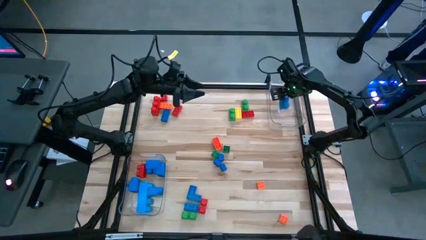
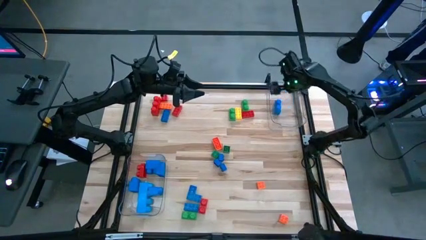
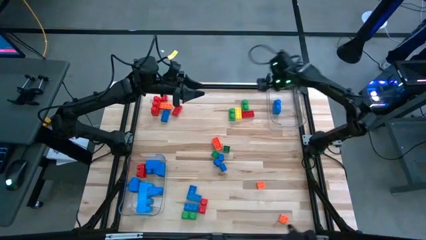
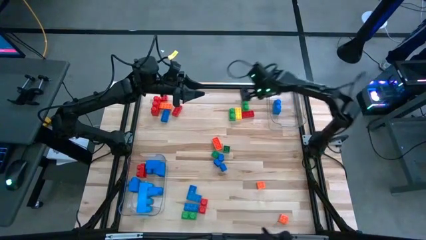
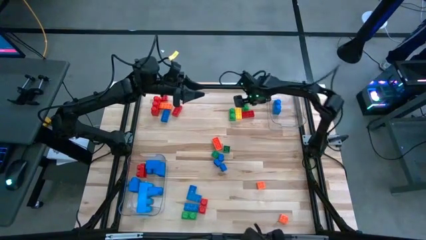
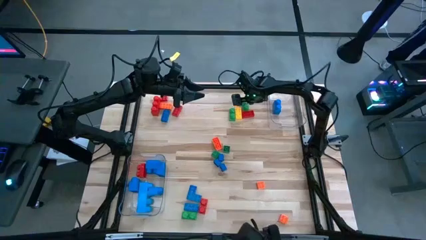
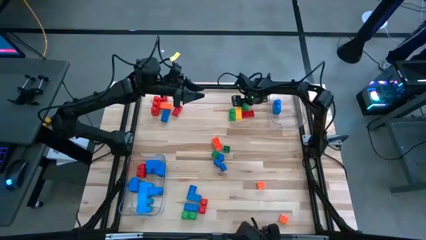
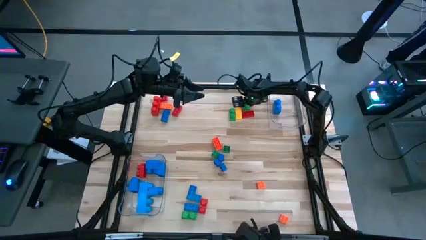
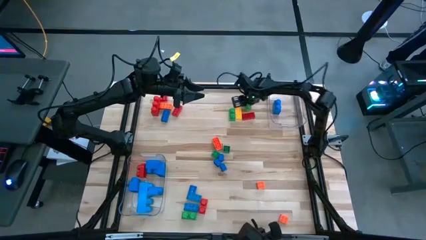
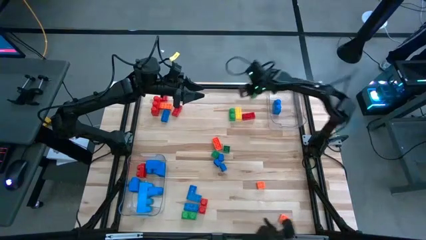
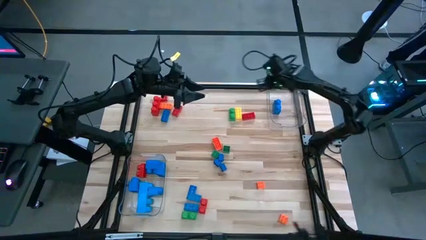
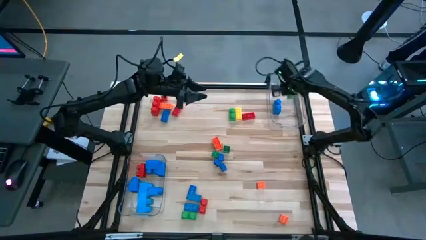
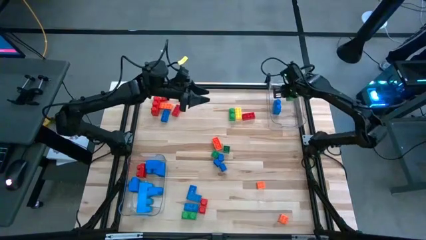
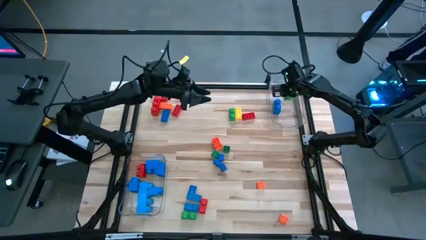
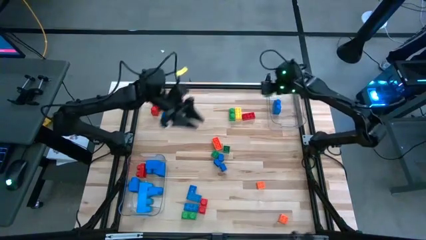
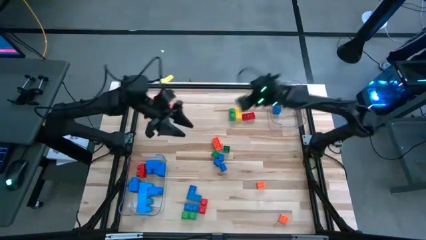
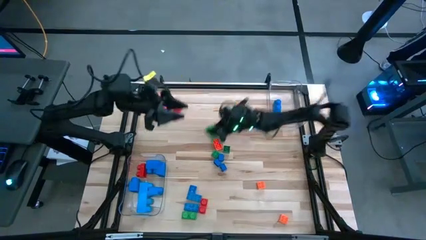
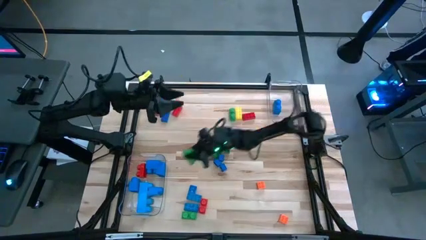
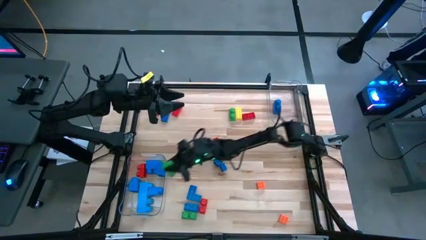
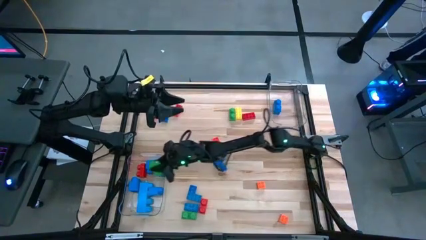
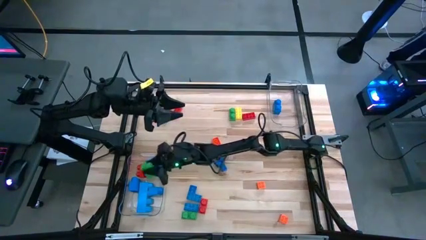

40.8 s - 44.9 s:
Task: Sort blocks by size
Put the large green game piece into the bottom transparent bin

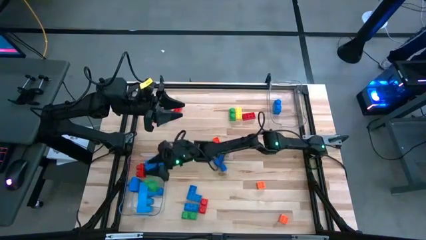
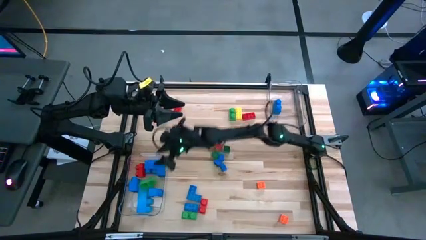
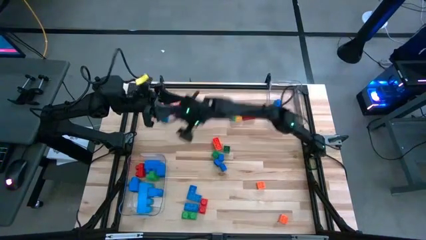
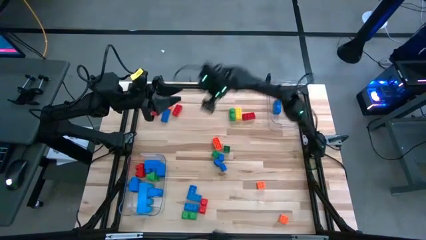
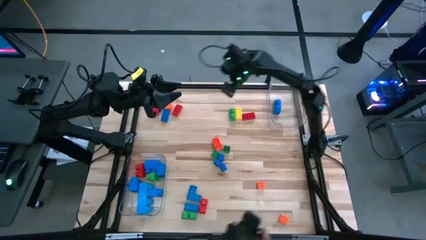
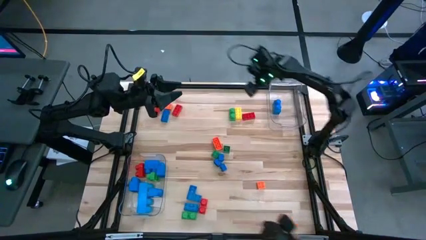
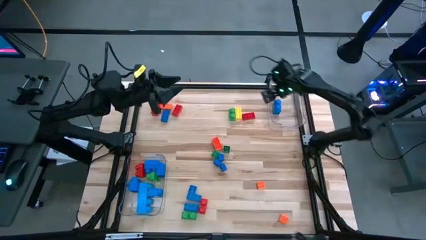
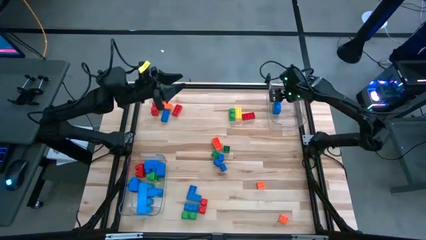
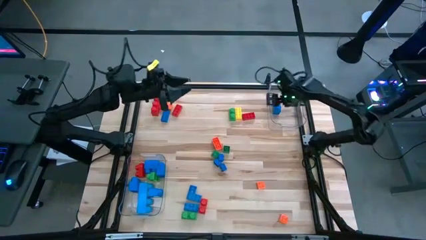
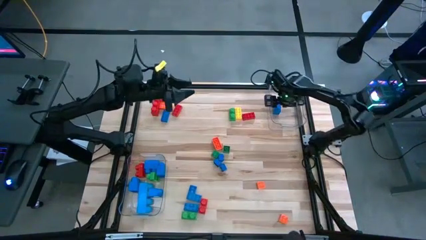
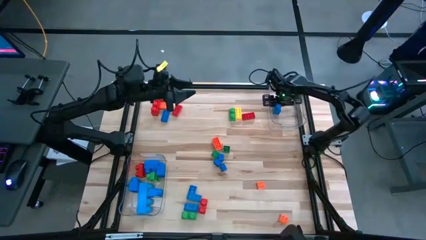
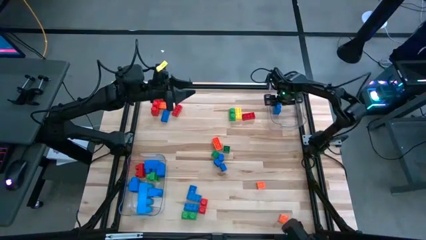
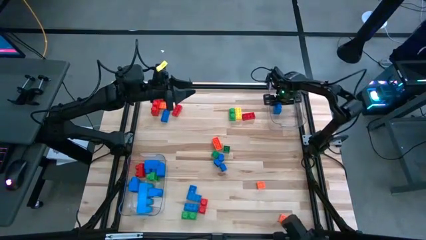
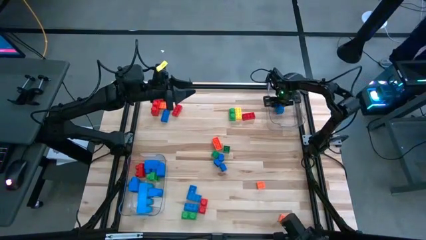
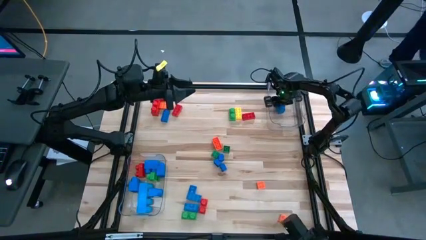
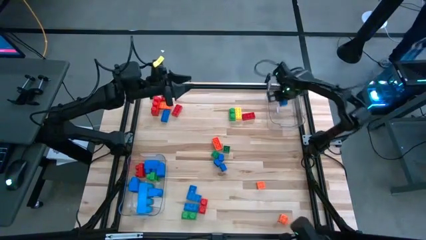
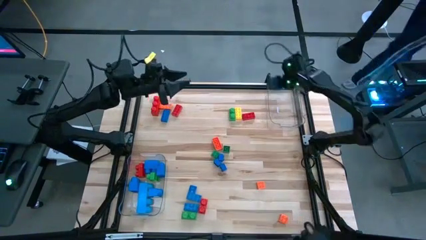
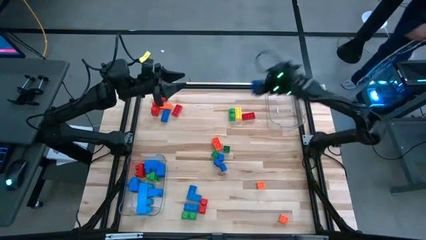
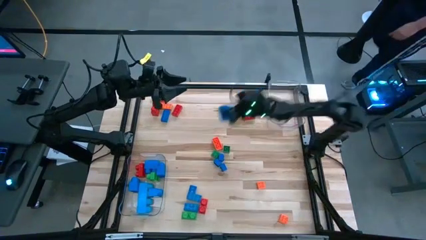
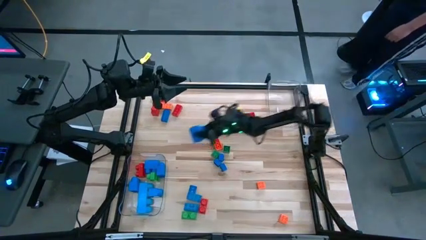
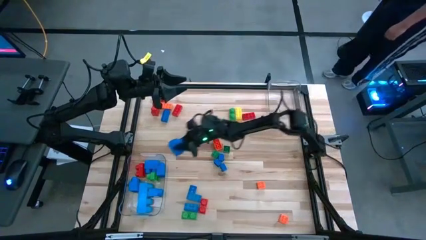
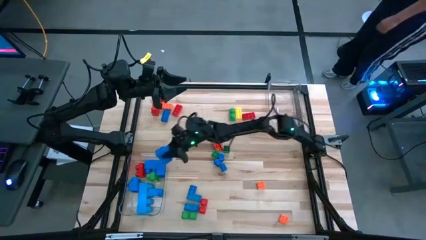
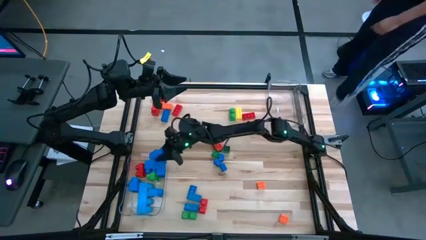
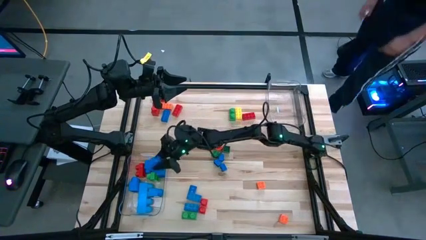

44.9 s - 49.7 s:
Put the large blue game piece into the bottom transparent bin

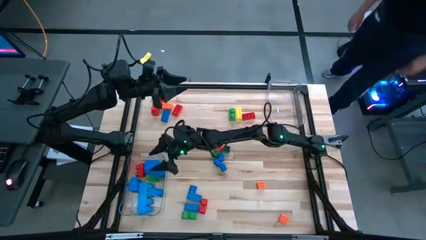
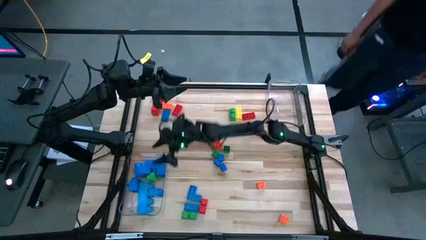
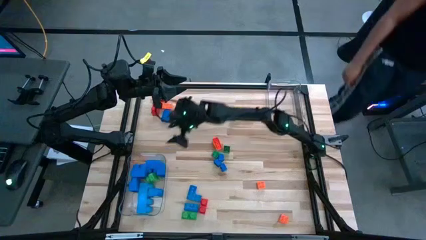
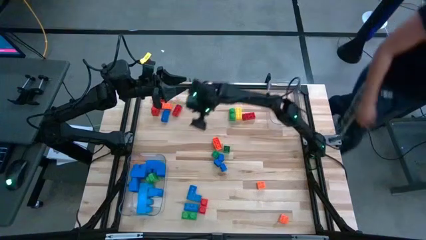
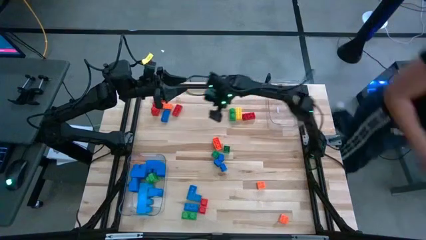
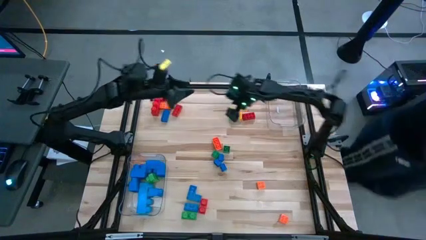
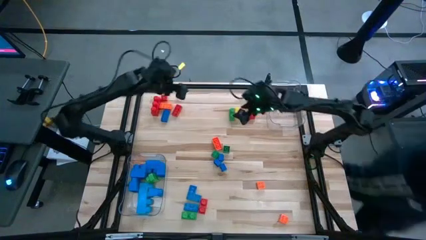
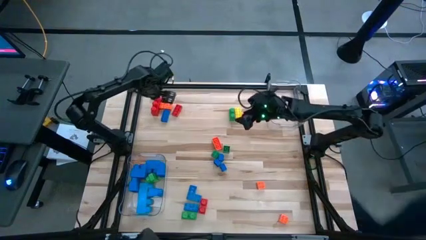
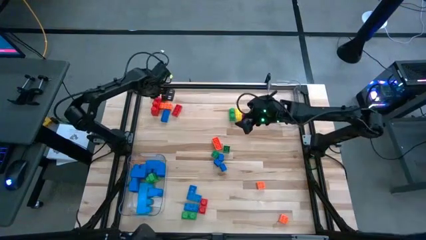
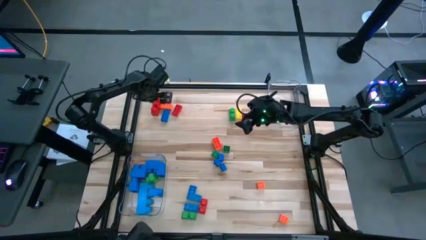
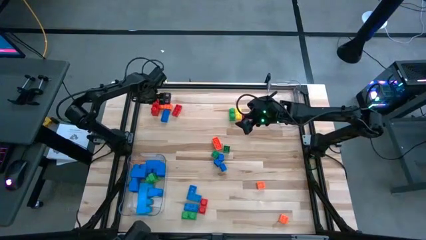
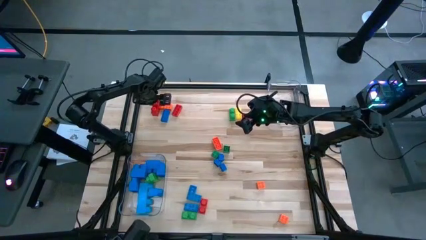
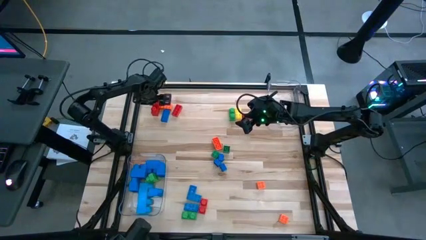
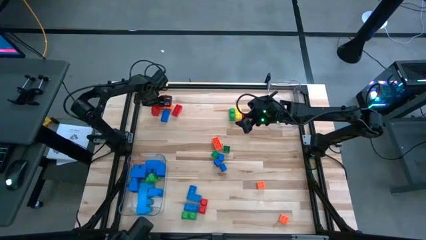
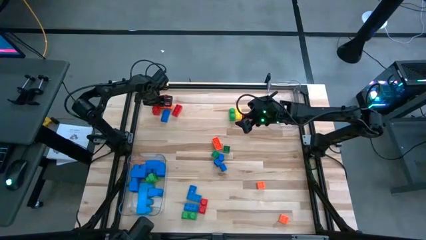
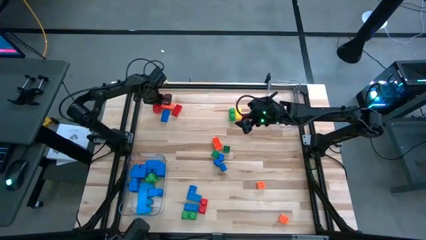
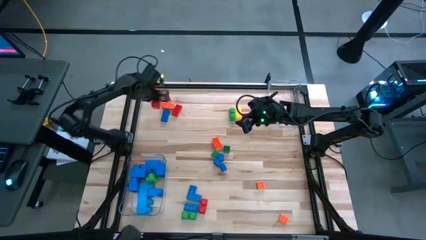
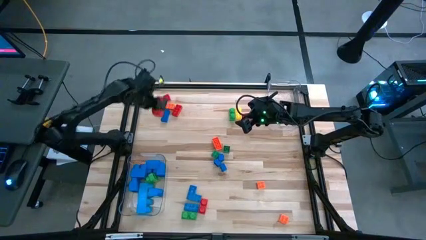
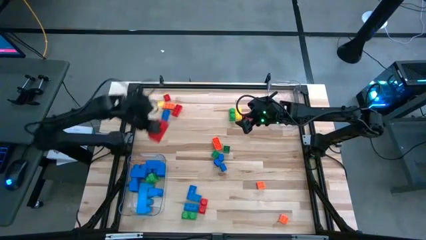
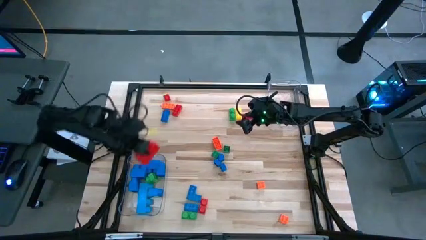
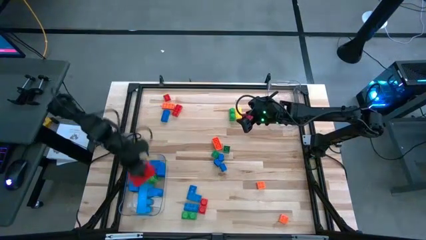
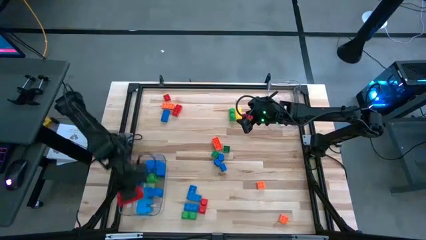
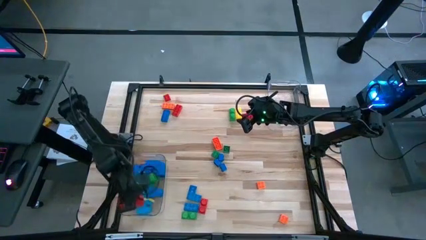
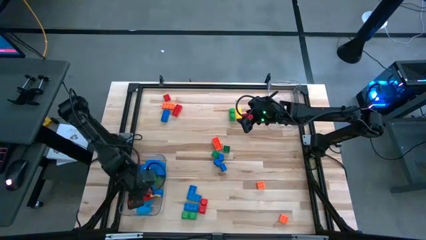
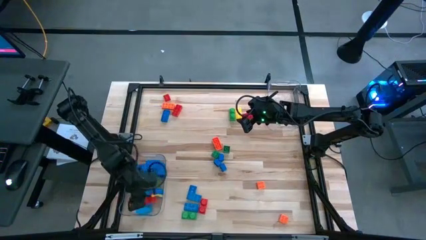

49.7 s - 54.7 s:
Put the large red game piece into the bottom transparent bin

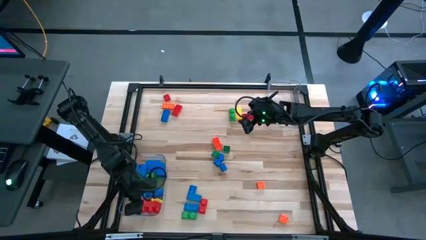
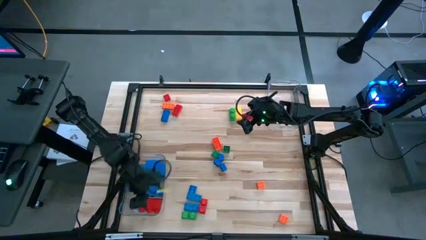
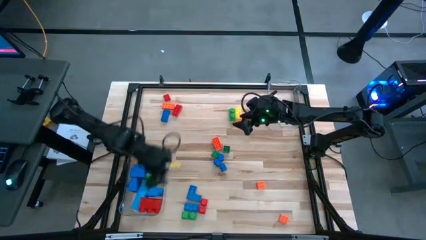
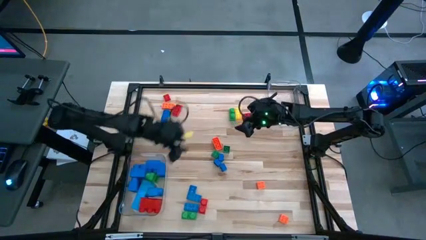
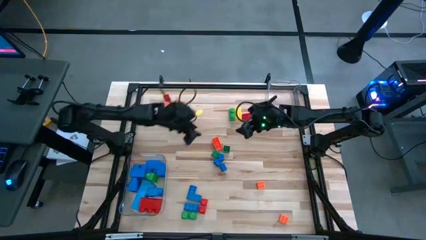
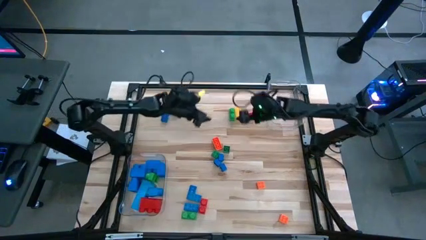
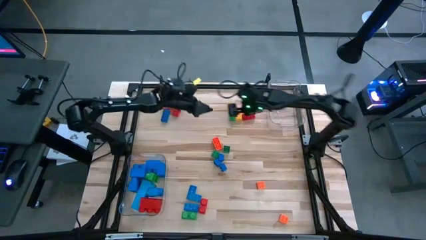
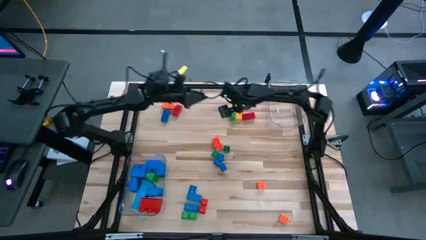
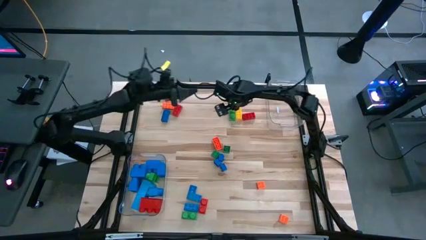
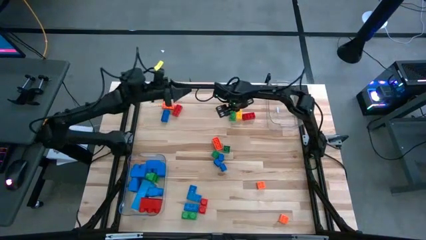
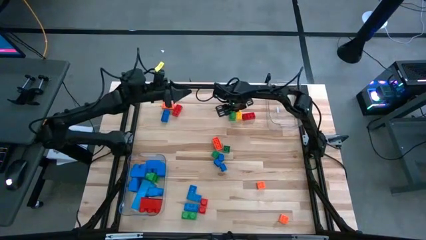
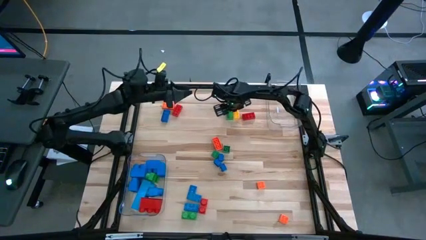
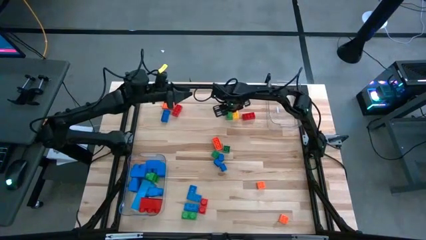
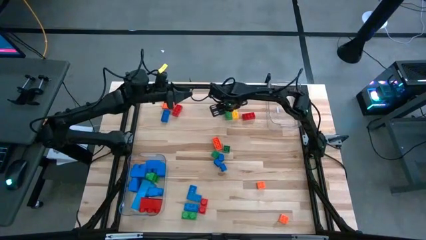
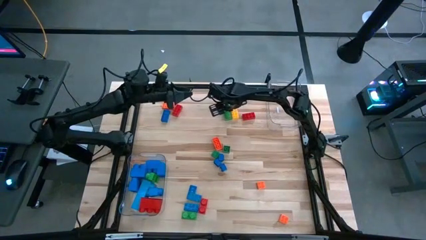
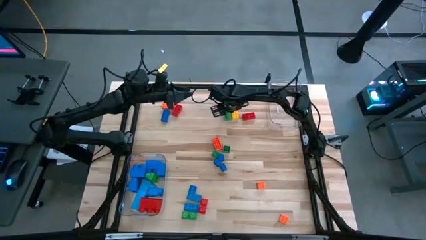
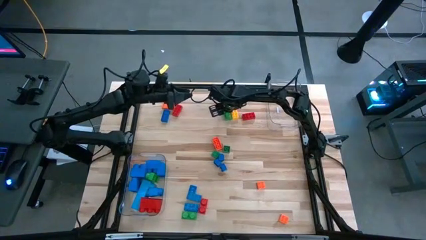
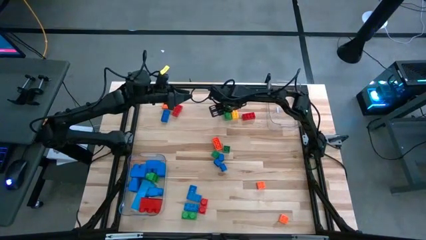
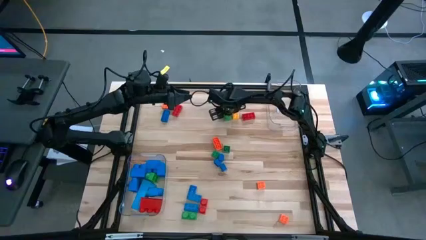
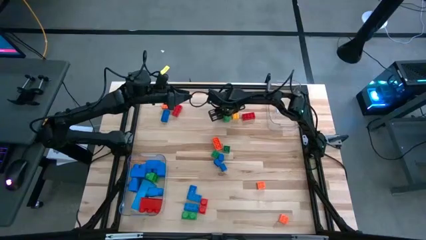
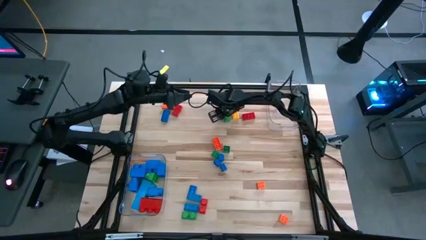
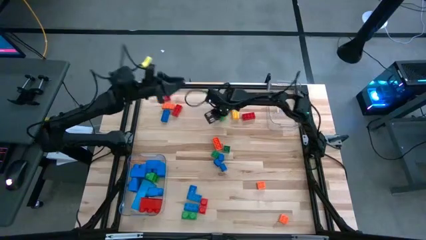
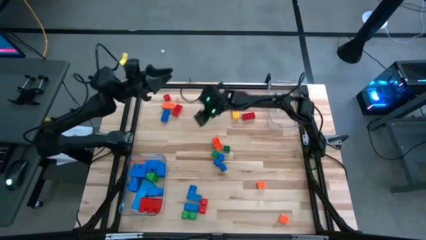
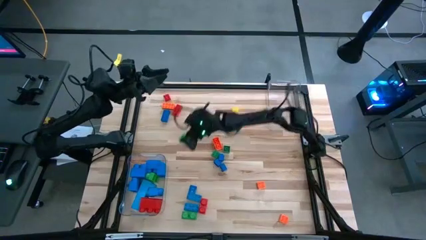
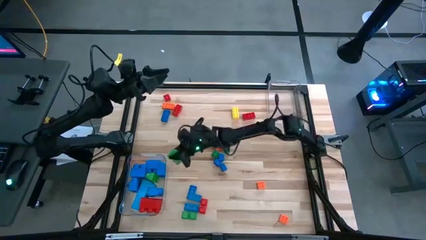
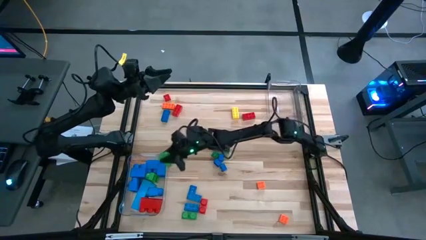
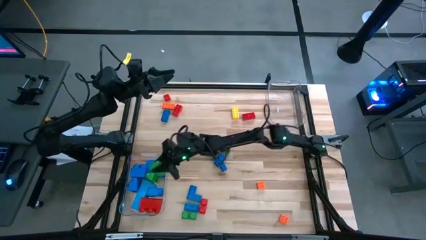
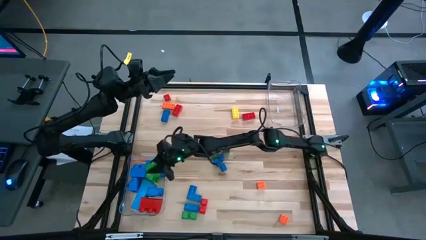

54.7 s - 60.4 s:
Put the large green game piece into the bottom transparent bin
